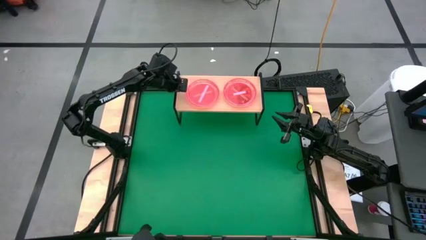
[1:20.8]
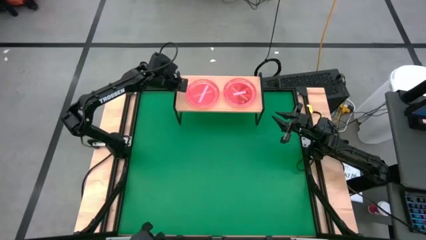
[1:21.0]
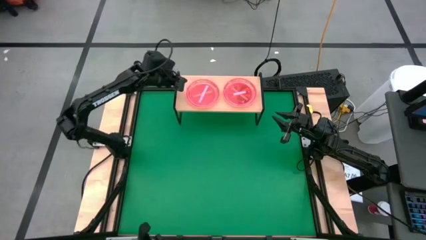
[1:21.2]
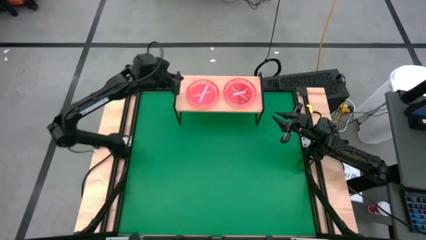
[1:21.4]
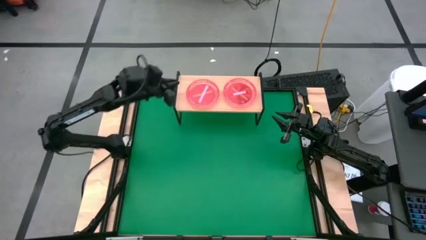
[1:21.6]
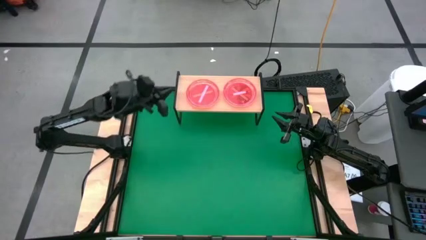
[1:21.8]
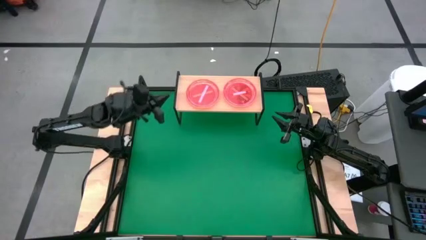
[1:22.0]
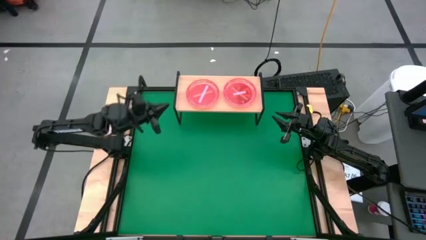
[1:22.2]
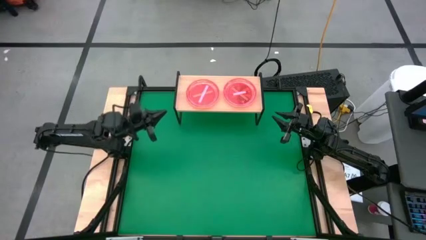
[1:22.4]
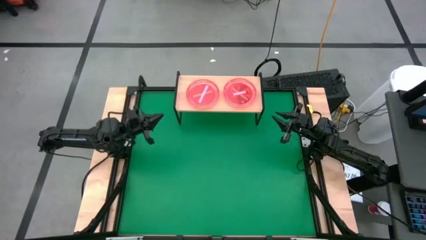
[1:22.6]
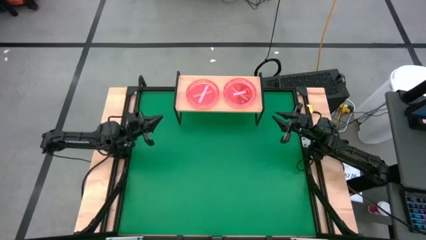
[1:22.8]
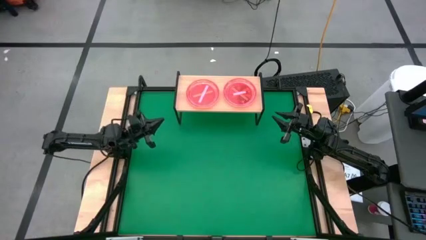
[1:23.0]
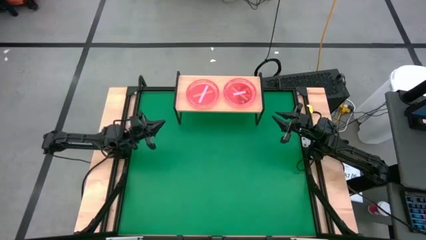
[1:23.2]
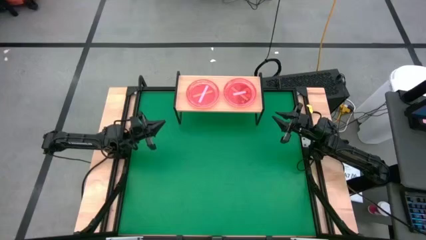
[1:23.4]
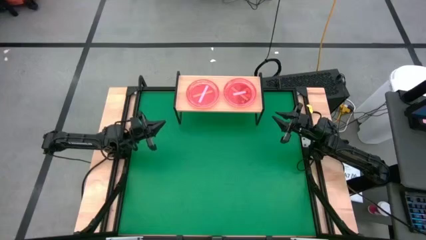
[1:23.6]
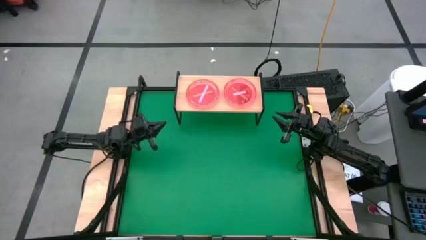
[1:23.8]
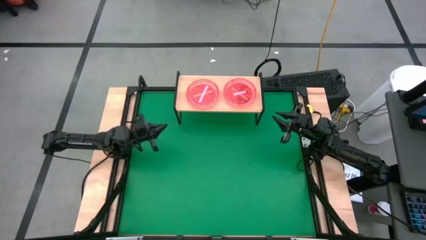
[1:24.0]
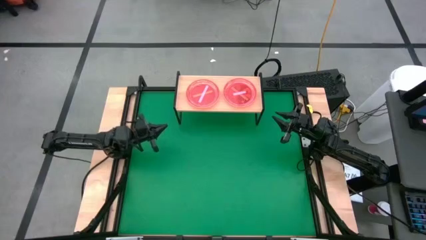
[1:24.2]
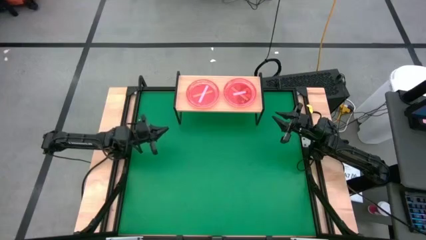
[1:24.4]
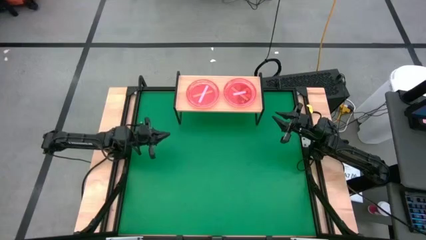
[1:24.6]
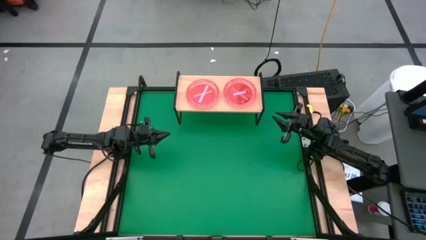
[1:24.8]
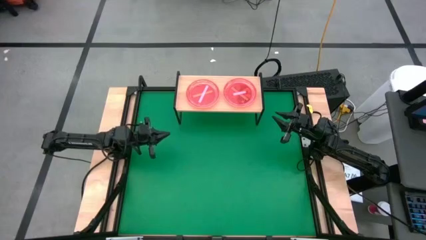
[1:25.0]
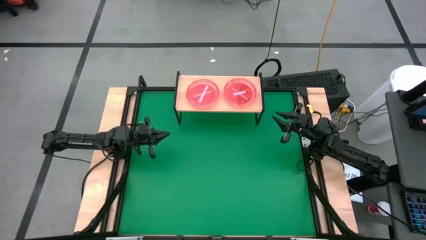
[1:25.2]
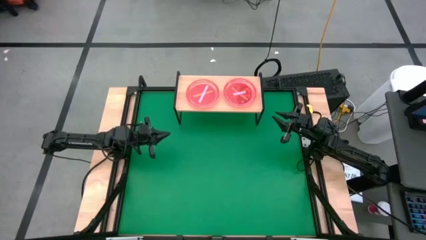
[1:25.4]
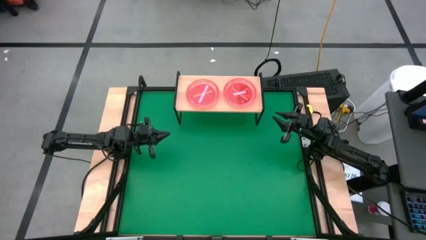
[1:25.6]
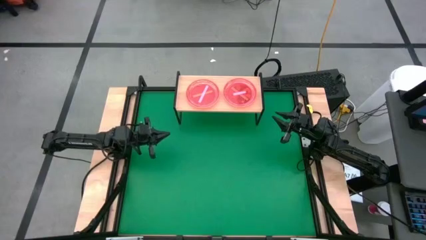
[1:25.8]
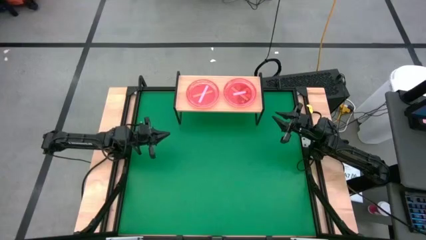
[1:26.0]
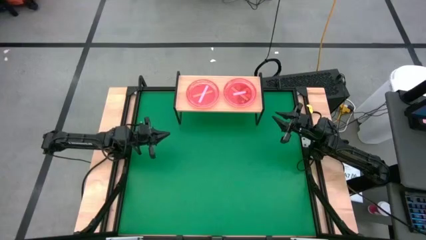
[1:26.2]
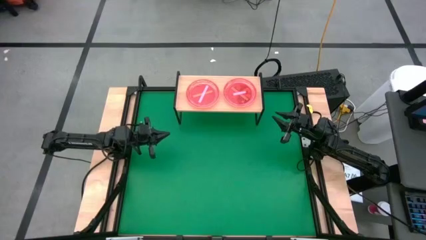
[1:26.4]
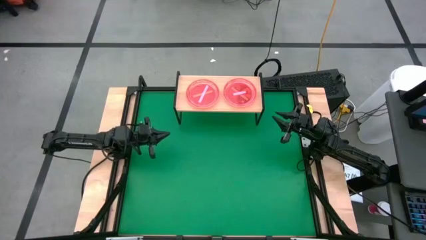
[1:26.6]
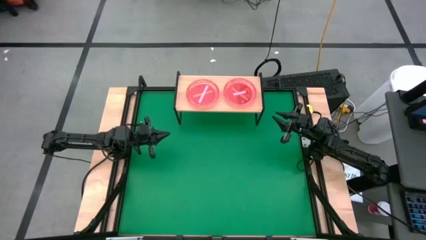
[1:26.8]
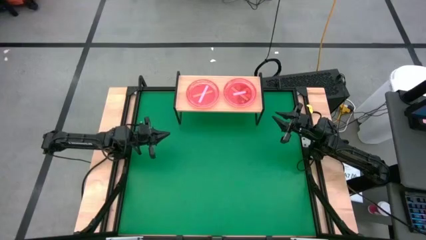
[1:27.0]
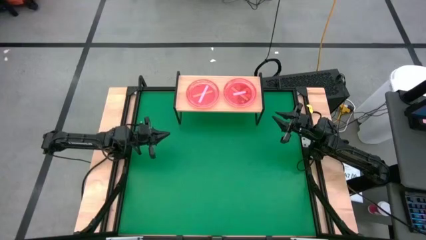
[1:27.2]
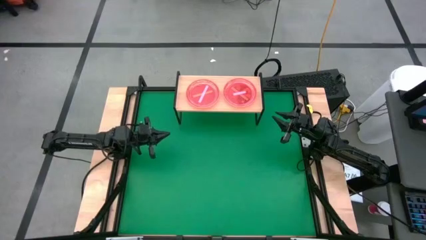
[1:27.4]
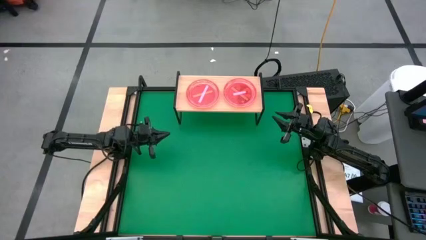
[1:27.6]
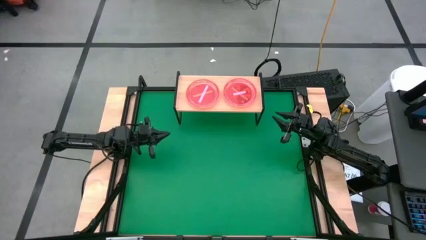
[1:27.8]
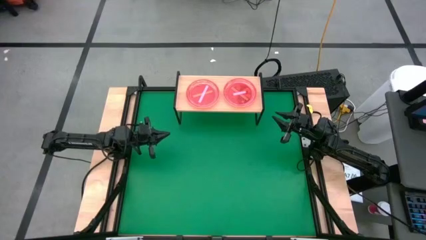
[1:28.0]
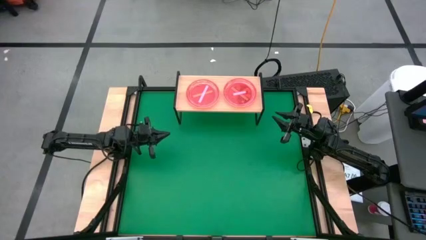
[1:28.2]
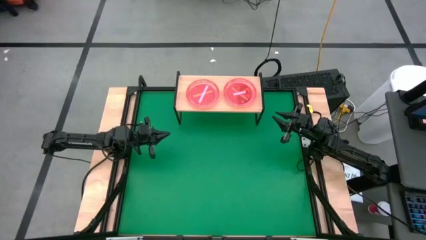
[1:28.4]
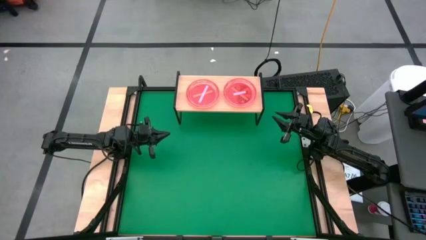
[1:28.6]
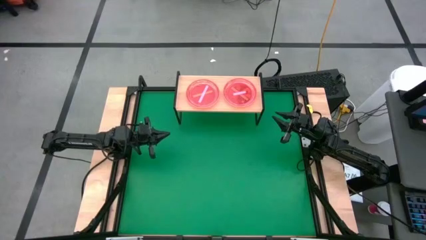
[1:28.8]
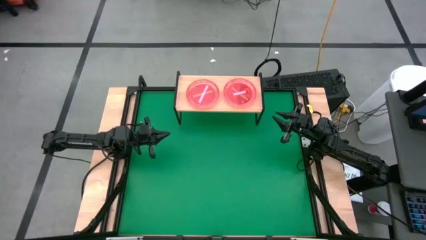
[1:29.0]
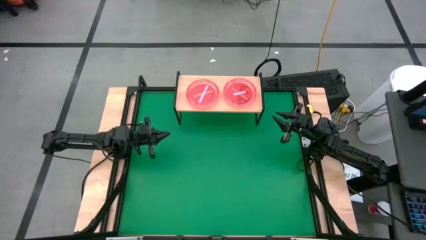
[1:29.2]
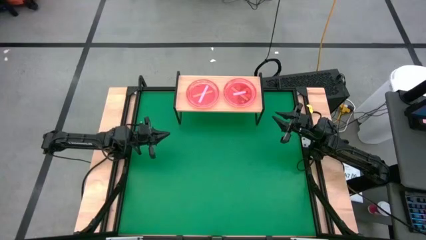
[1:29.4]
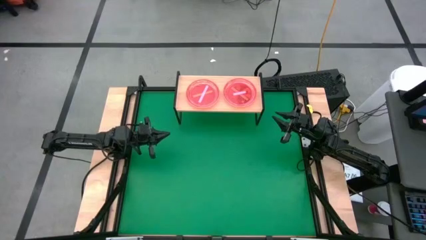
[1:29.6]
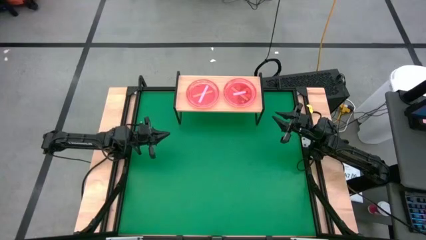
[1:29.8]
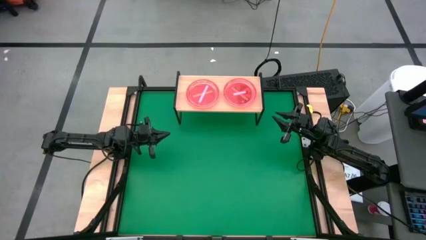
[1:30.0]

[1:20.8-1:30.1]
Task: Place and stack plates onto a shelf
Return to Home Position

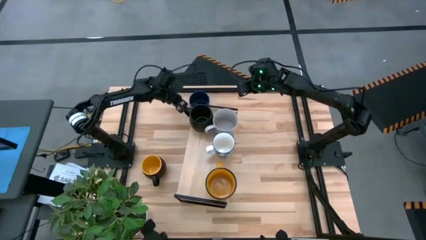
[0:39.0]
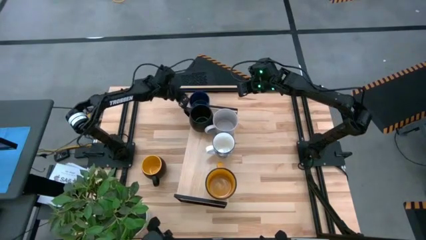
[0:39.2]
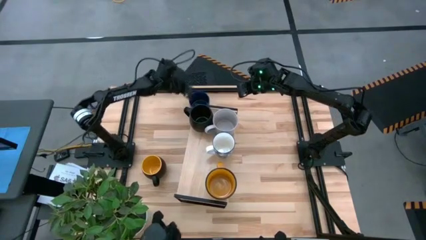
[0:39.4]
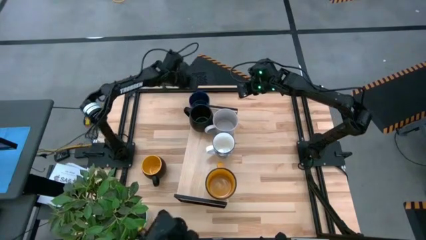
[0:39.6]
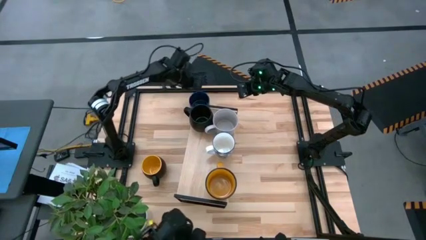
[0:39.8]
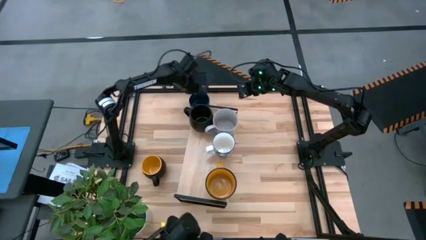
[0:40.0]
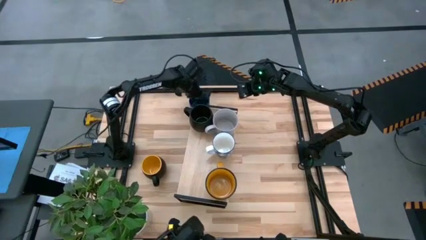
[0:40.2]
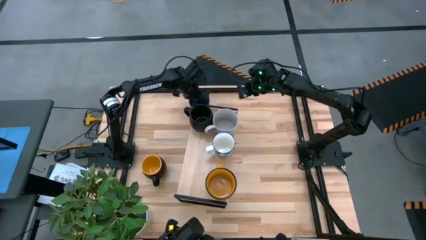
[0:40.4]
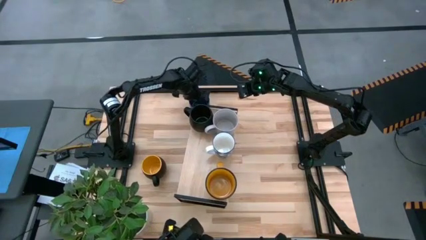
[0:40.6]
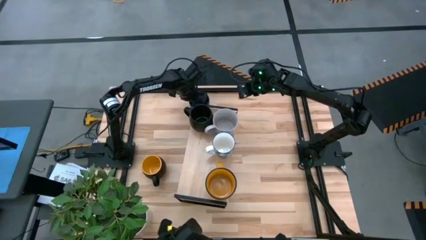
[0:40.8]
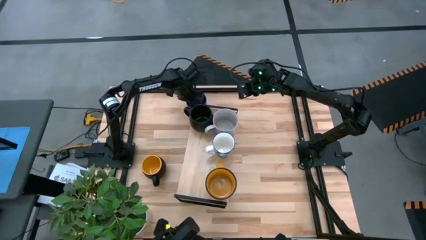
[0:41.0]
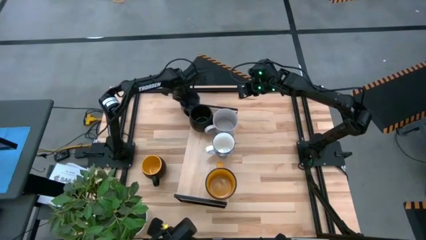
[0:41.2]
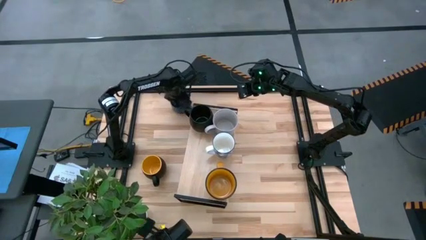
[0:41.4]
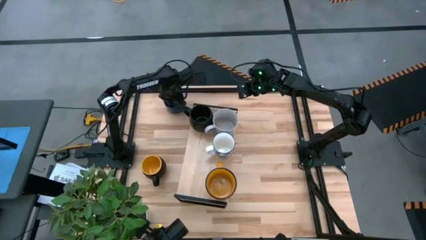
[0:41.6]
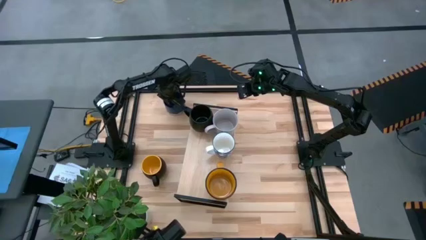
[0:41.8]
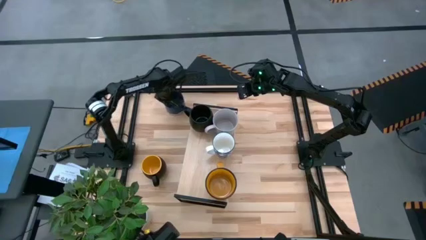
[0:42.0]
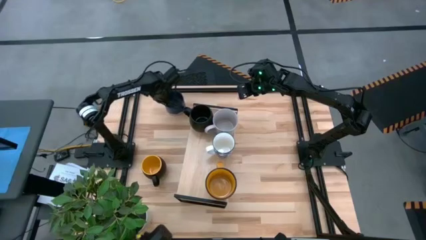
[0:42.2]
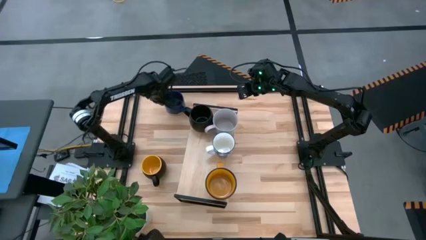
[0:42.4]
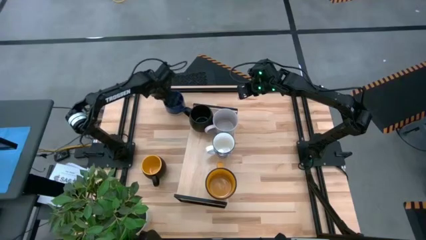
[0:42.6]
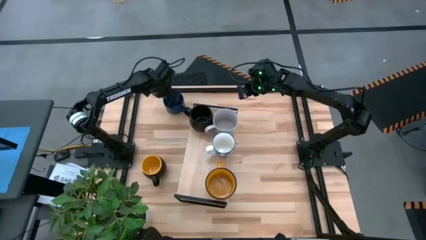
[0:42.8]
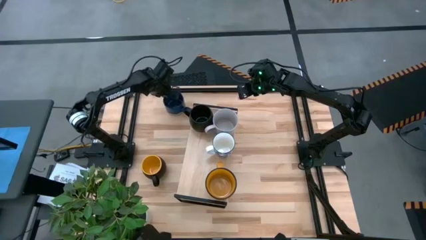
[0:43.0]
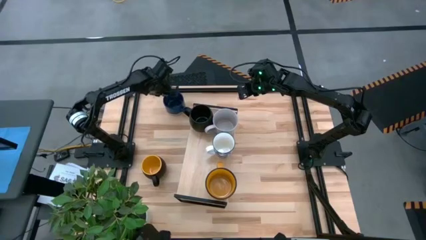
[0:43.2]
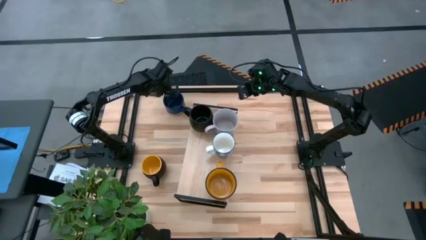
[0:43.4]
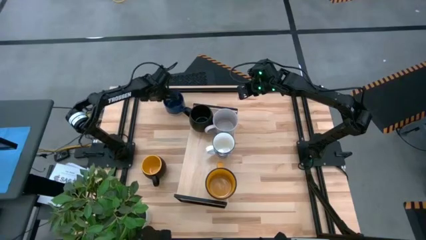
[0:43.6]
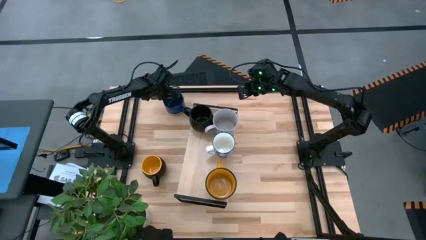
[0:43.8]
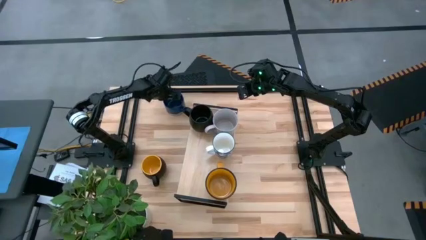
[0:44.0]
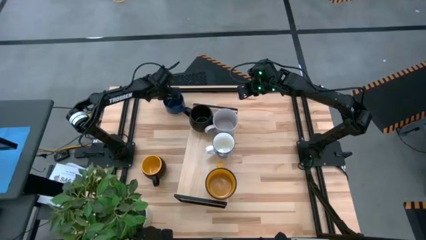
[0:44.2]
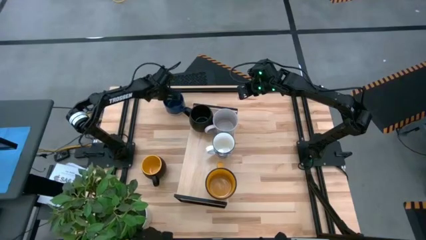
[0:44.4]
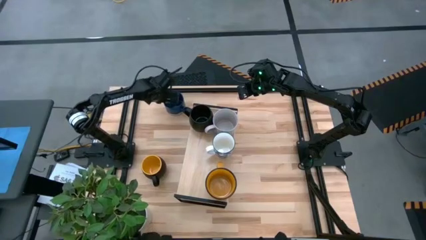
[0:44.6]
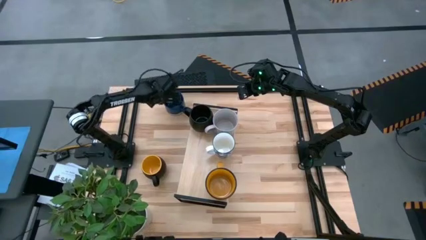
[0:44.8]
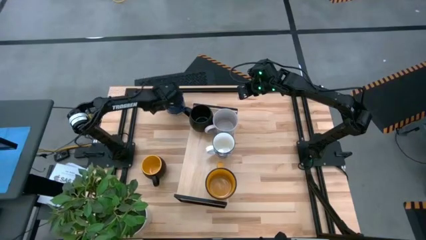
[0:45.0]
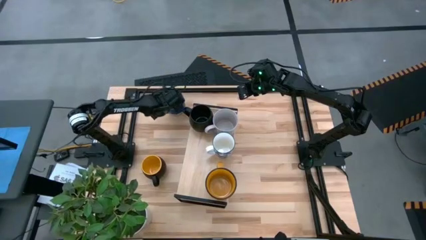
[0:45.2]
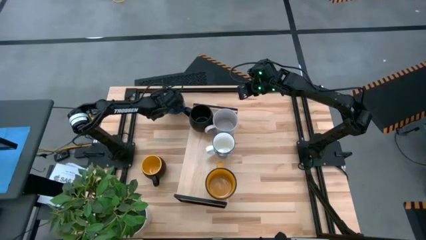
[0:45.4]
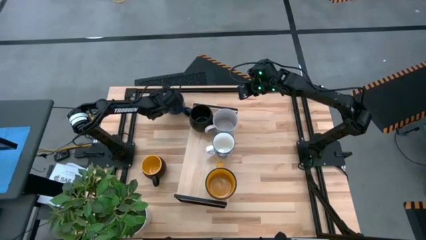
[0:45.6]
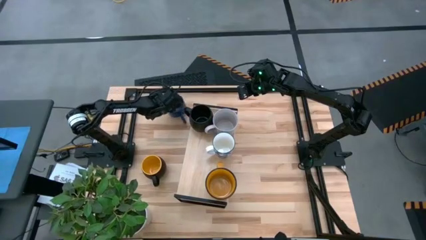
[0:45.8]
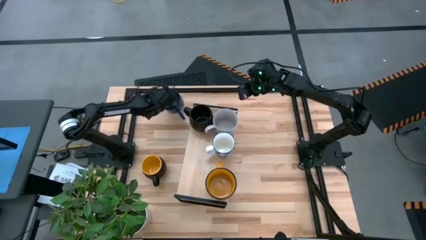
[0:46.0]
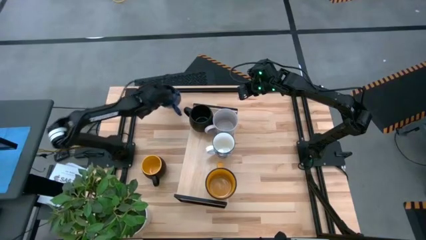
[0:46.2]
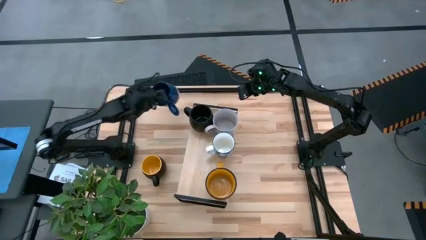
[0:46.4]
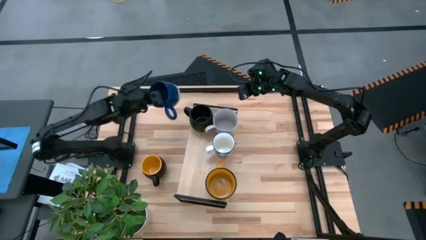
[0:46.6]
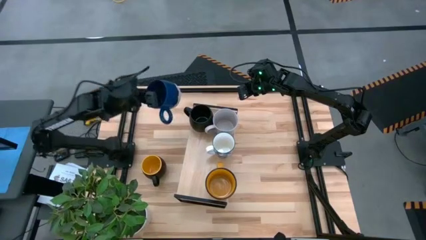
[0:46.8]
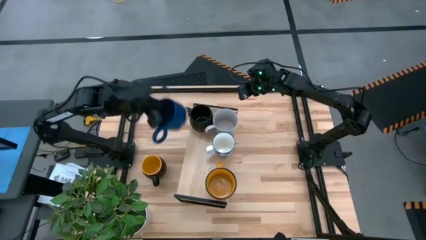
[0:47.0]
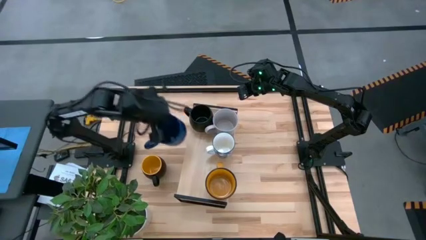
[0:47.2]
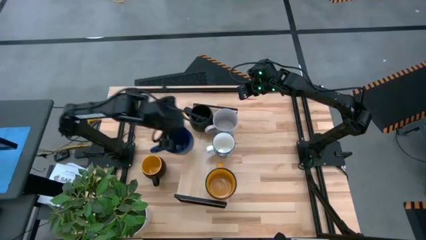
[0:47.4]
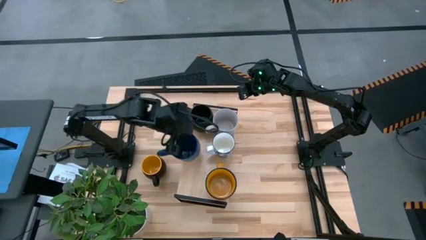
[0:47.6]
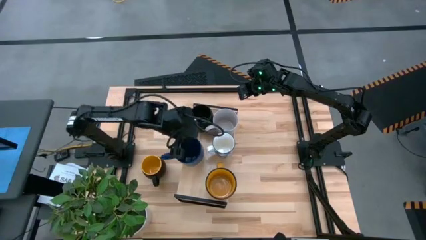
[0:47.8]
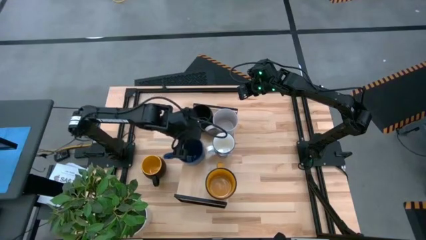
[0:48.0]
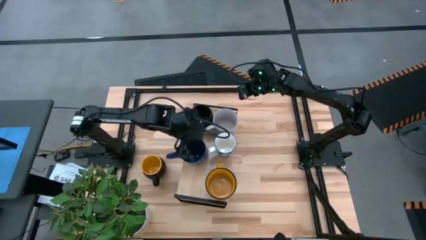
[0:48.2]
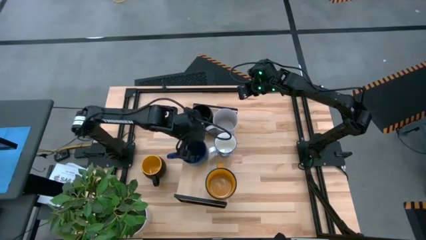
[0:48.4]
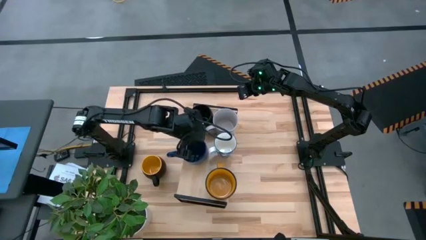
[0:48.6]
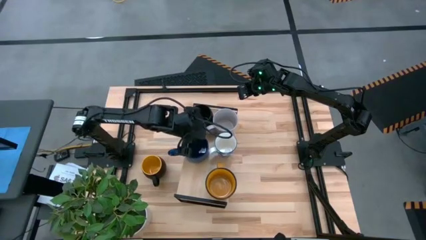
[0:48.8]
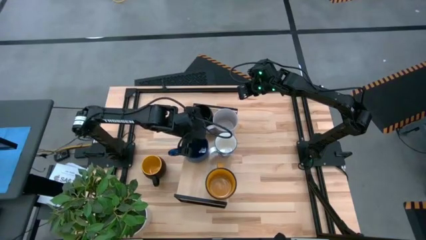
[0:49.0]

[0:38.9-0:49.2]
Task: Place coffee mugs
Put the blue mug on the shelf
